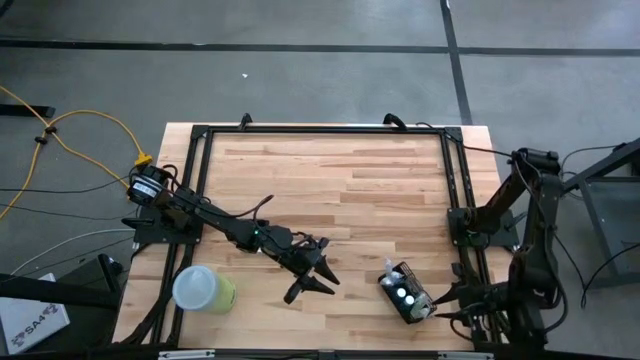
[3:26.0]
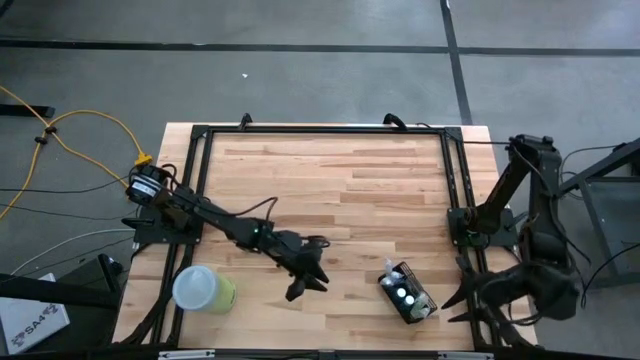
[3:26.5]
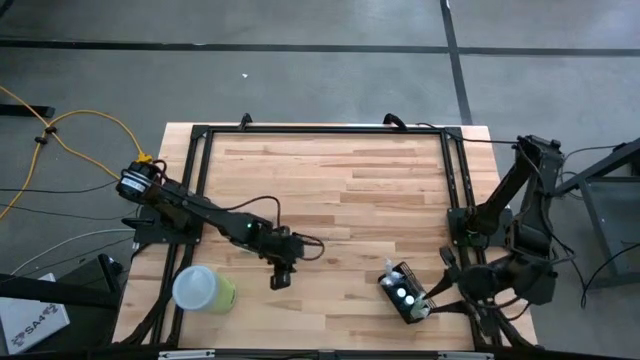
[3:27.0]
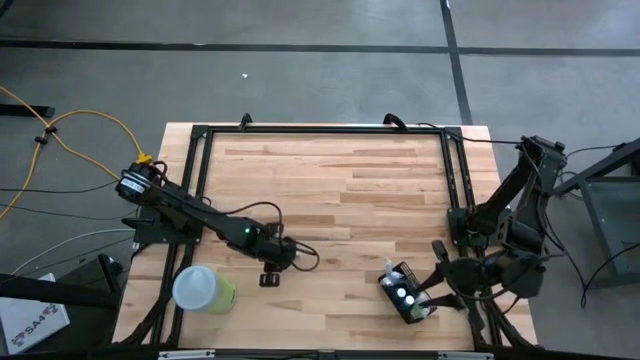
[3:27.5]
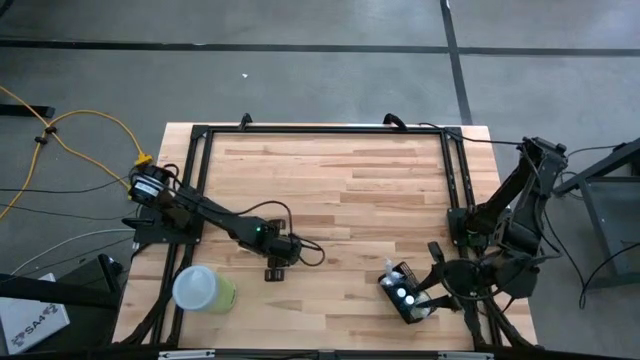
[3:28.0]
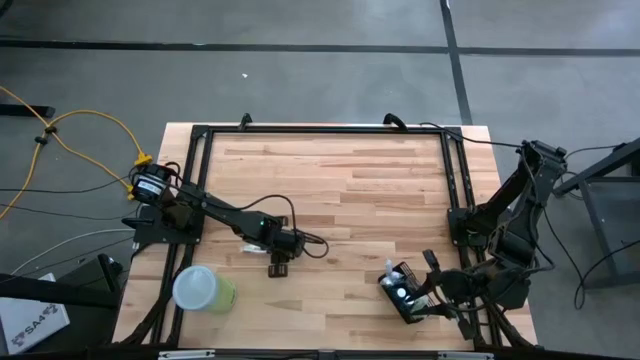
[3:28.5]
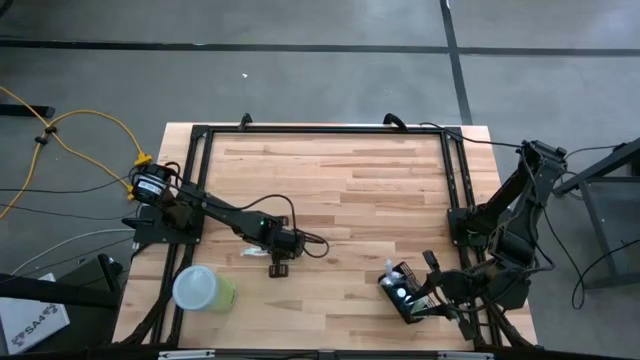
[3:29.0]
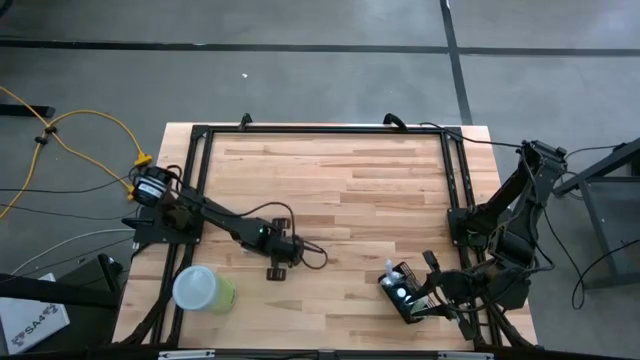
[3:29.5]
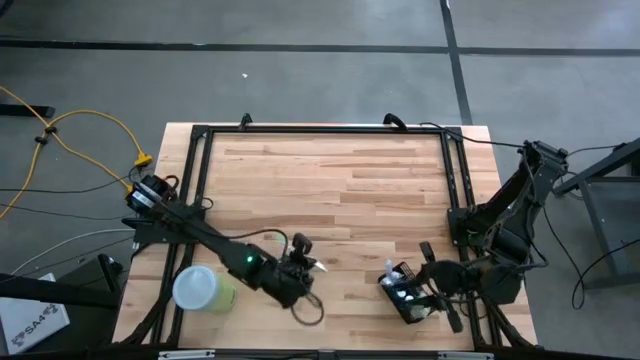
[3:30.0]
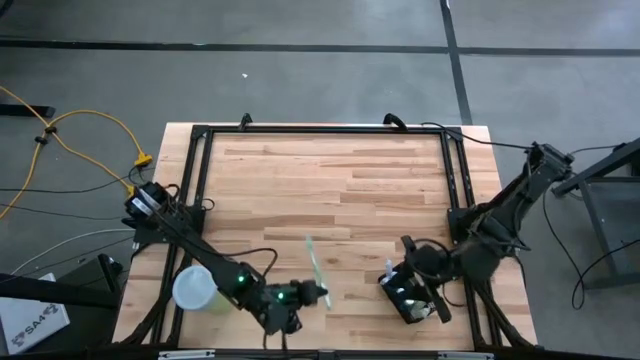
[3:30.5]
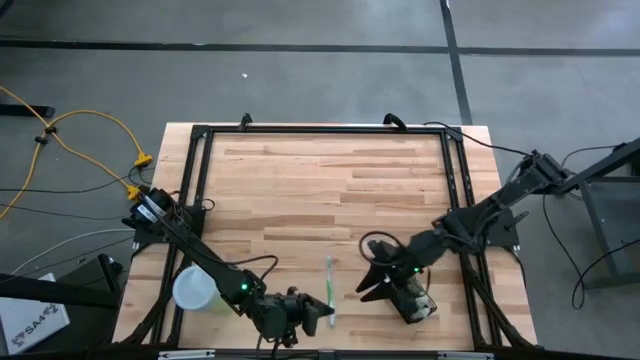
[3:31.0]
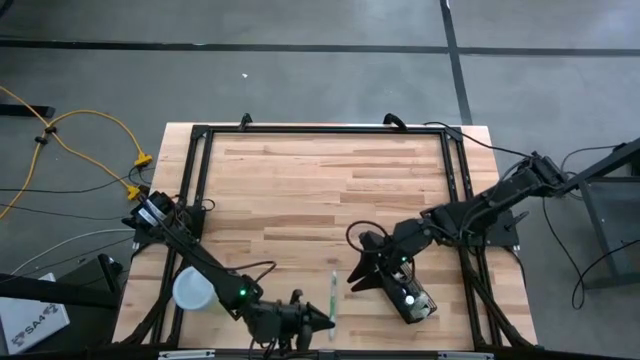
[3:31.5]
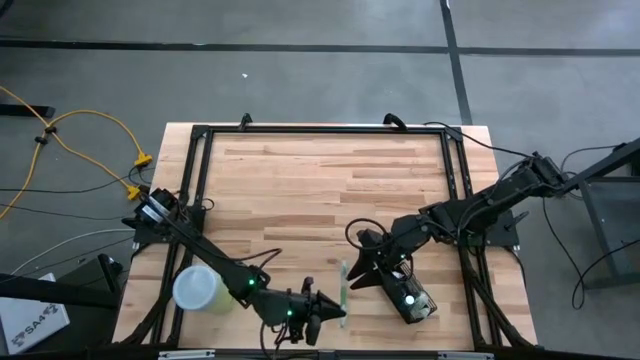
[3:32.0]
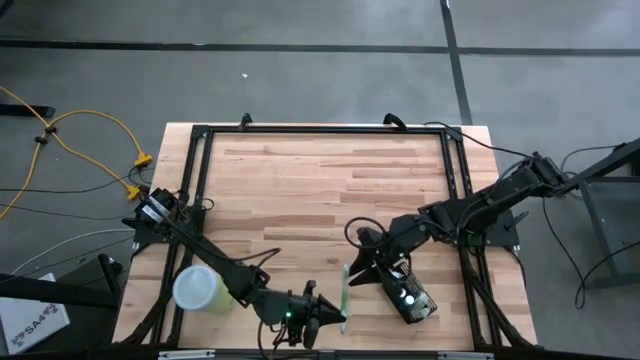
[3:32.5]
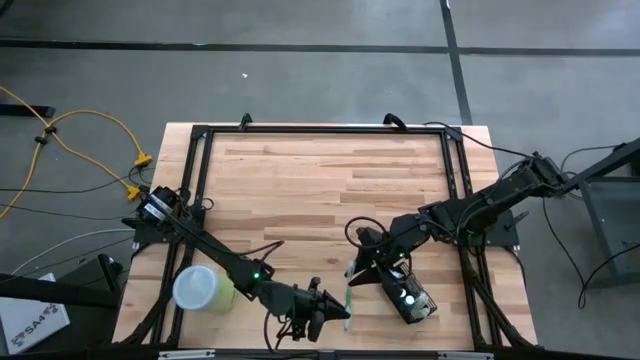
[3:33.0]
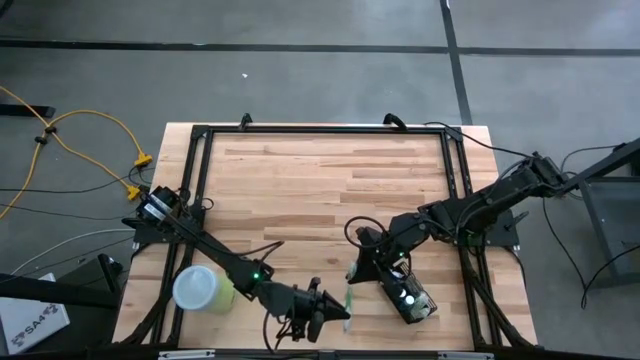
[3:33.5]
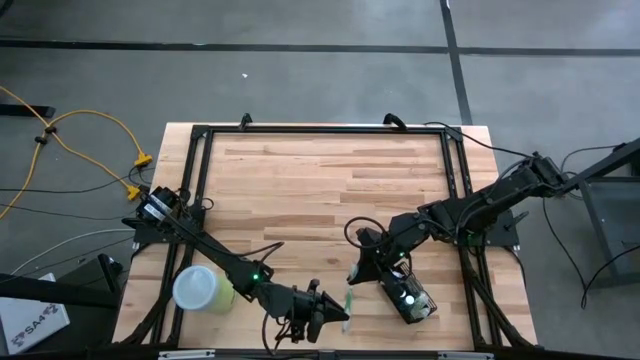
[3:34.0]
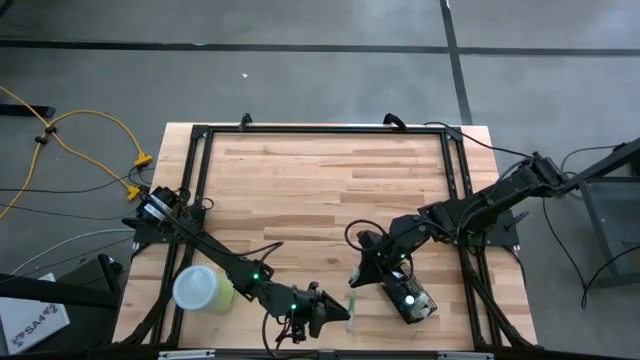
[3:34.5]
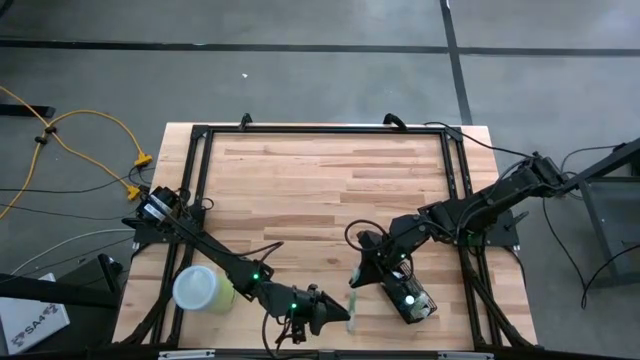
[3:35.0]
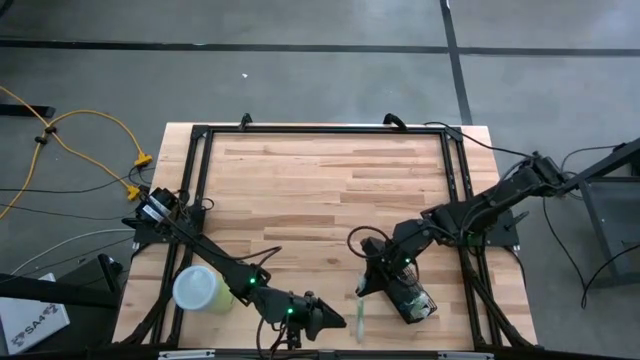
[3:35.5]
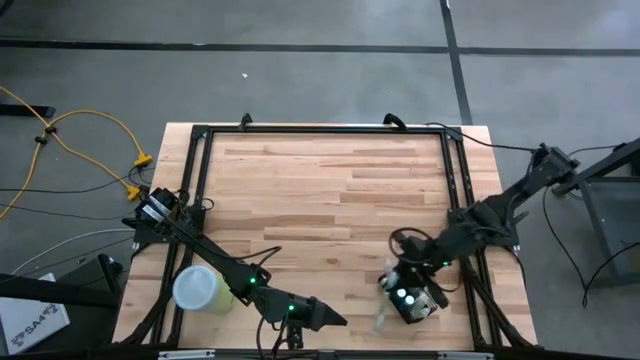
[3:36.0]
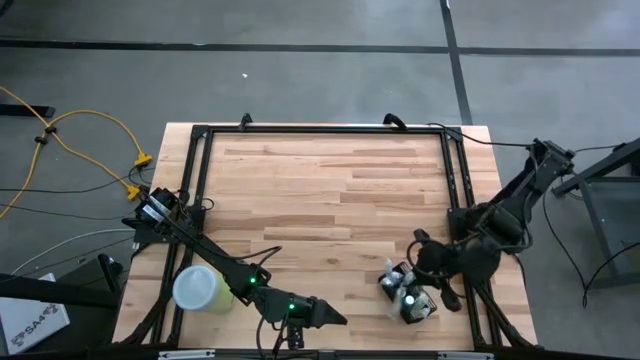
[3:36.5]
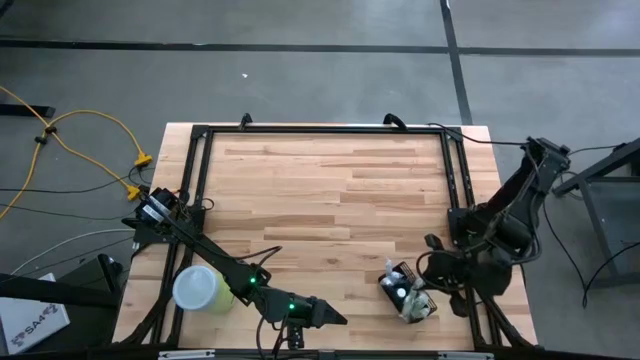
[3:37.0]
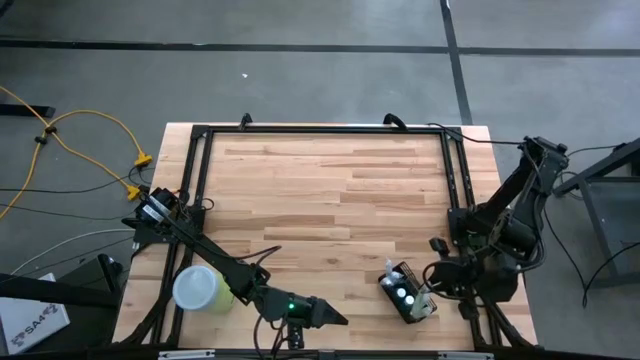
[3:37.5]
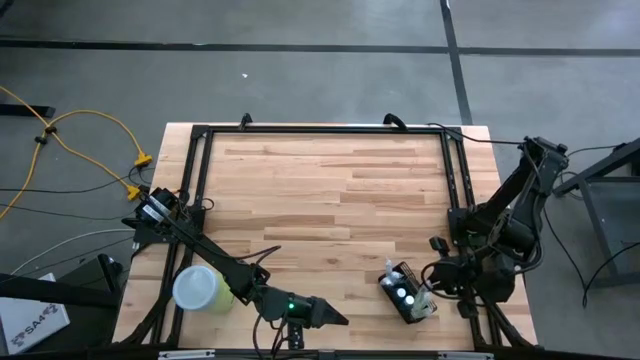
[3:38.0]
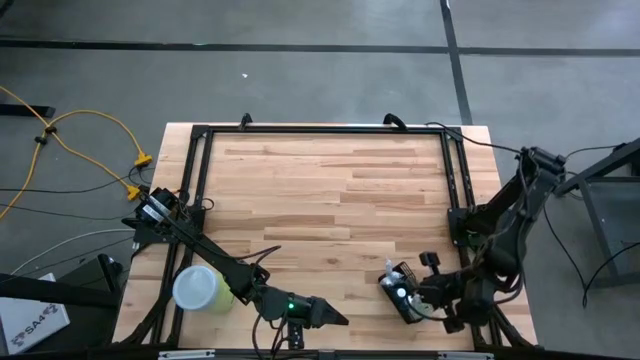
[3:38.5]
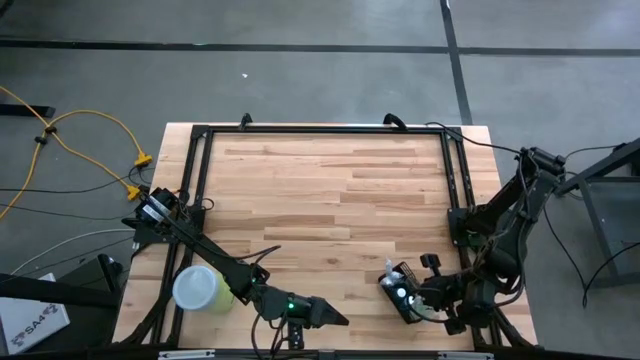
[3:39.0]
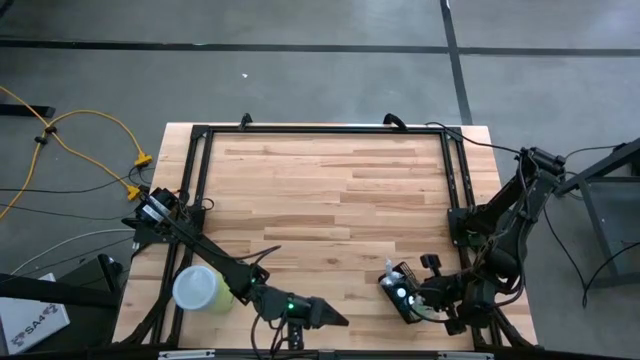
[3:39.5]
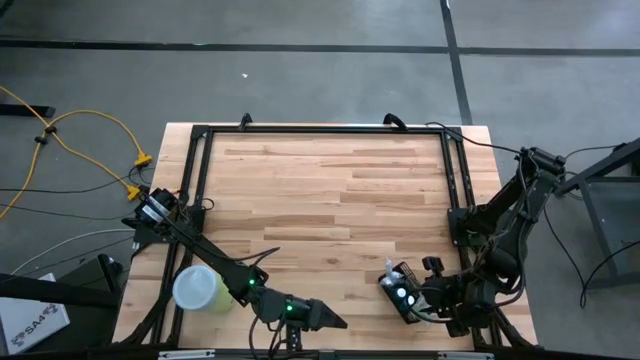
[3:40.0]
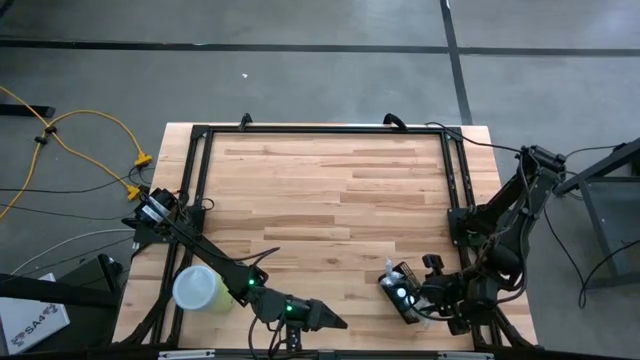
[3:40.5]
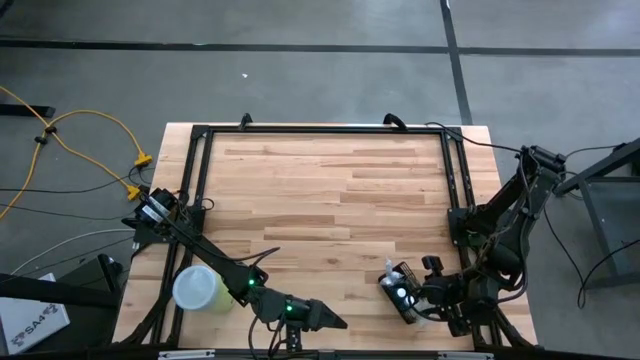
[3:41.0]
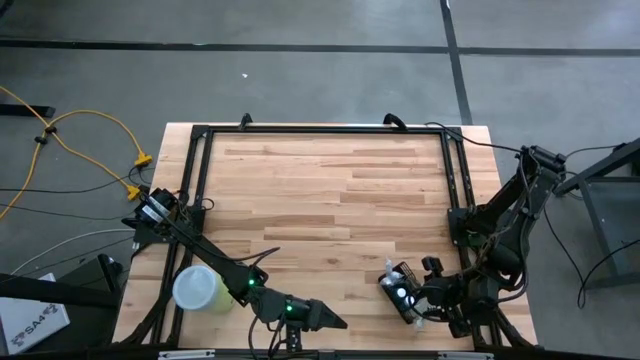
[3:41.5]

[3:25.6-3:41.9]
Task: Pick & Place toothbrushing station
Put the green toothbrush into the bottom section of the black wire organizer

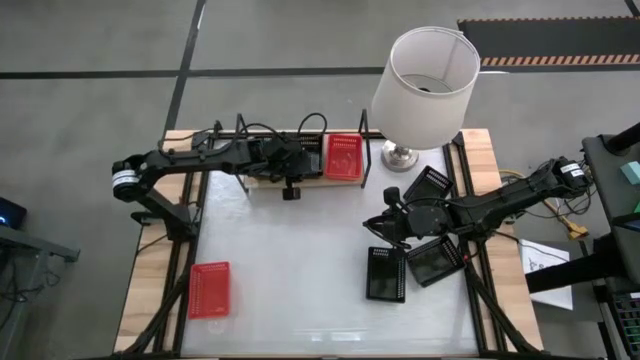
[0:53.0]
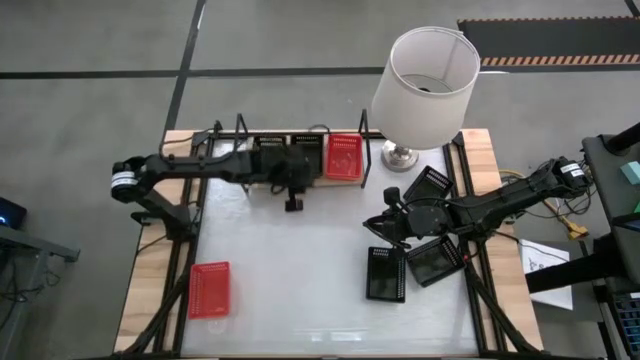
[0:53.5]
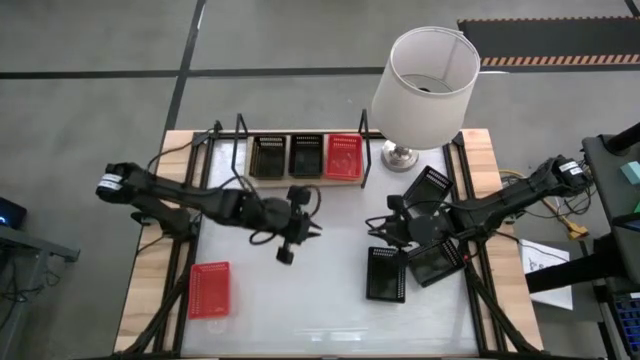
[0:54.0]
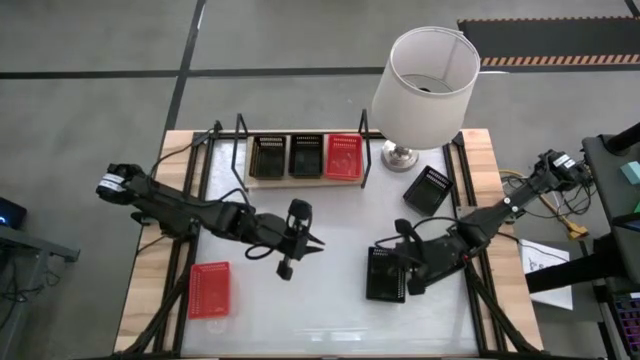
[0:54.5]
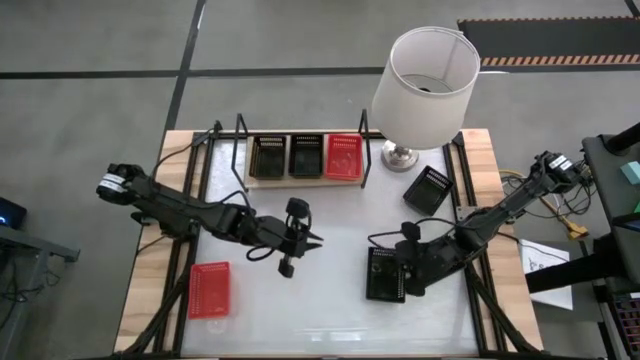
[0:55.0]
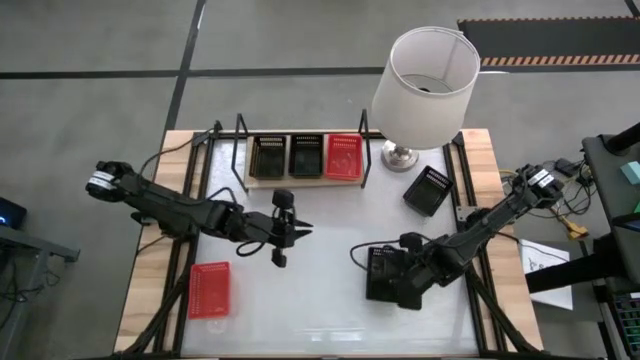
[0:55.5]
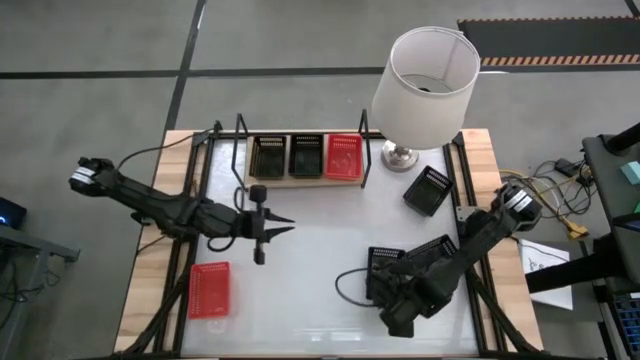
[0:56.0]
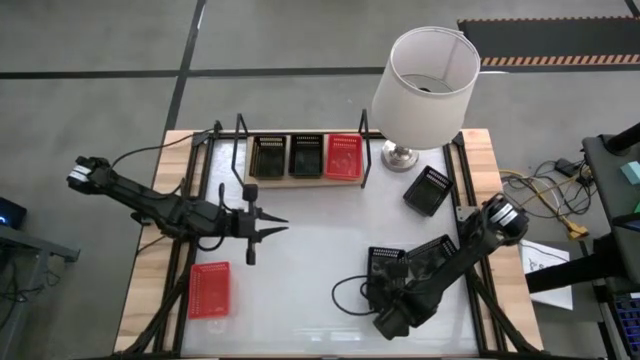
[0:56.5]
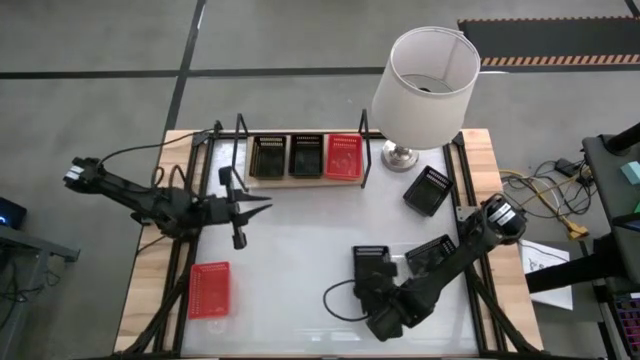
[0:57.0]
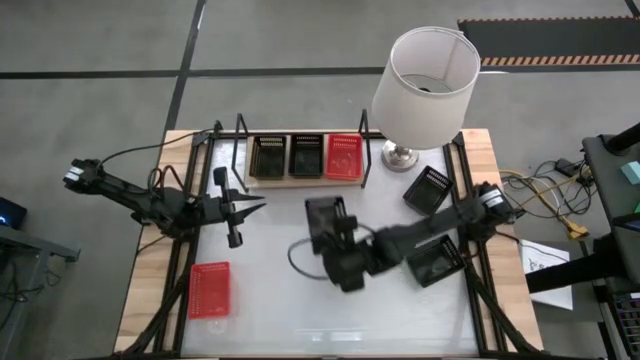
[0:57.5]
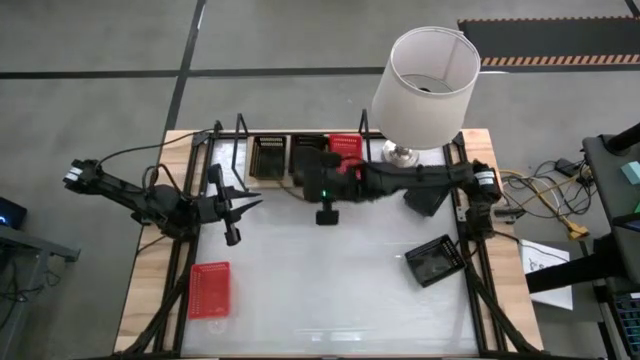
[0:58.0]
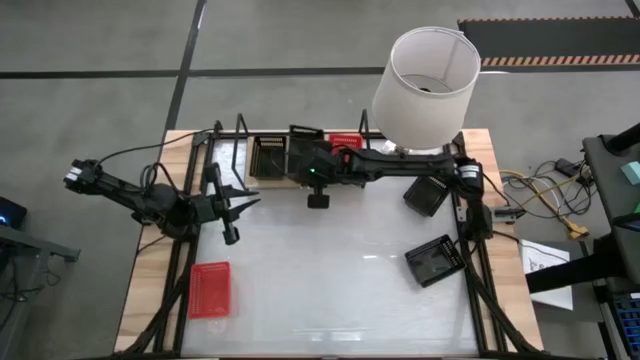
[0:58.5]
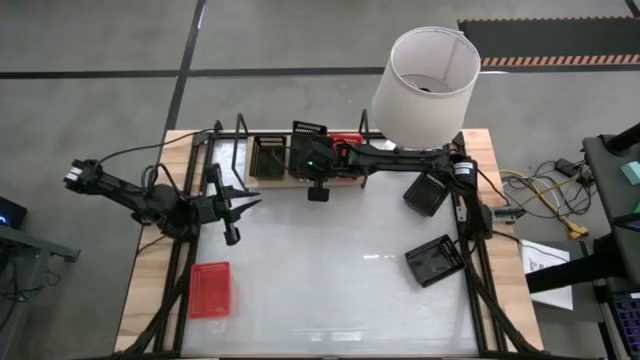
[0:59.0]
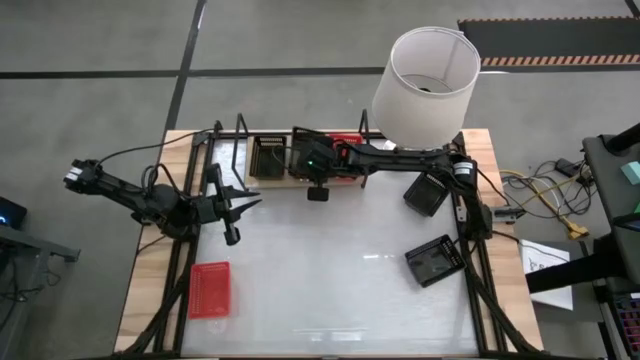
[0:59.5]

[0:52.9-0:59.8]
Task: Stack baskets on shelf by color
Stack the black bin on the right black bin on the shelf
